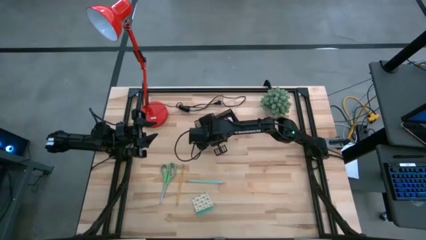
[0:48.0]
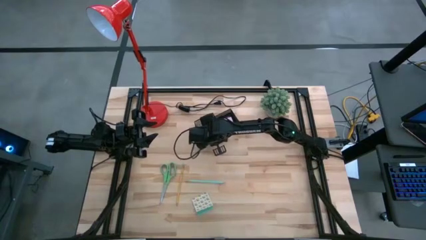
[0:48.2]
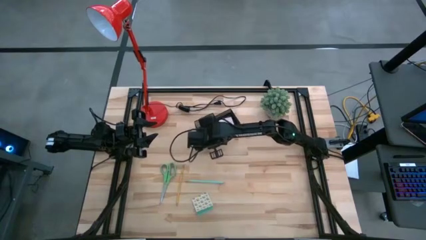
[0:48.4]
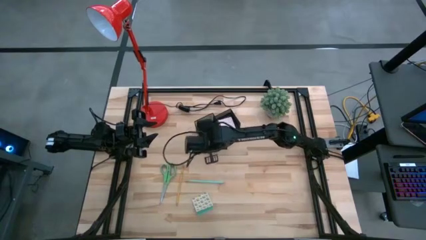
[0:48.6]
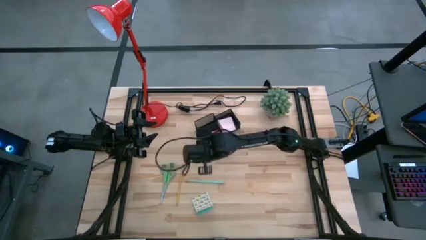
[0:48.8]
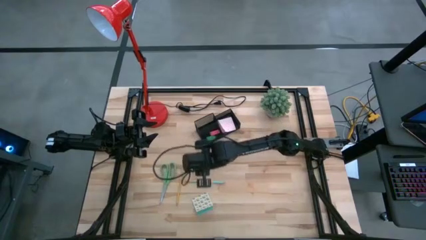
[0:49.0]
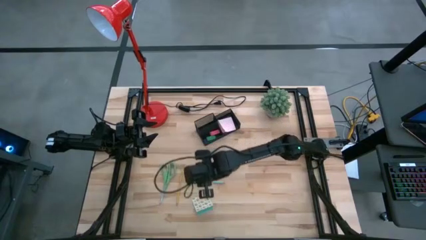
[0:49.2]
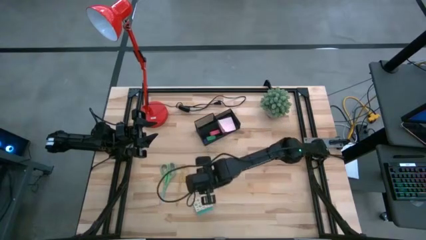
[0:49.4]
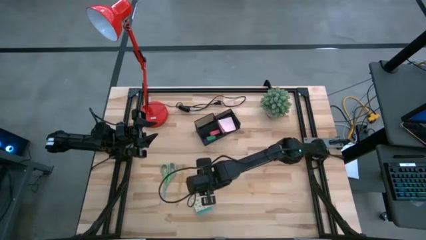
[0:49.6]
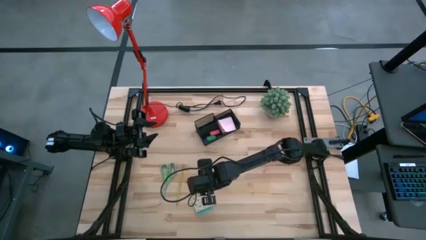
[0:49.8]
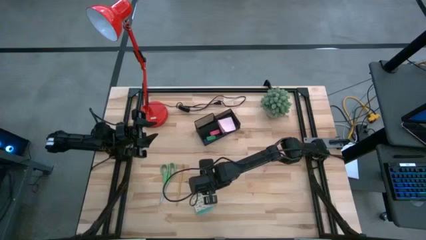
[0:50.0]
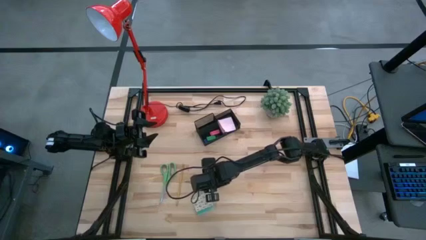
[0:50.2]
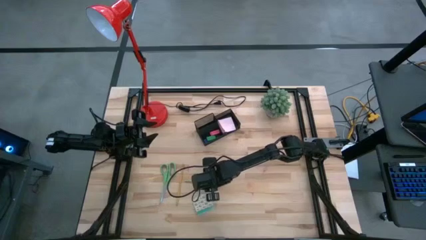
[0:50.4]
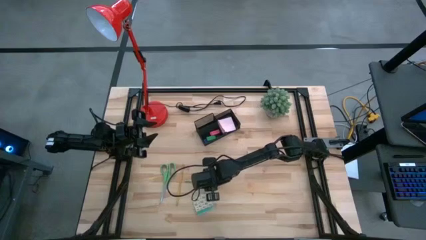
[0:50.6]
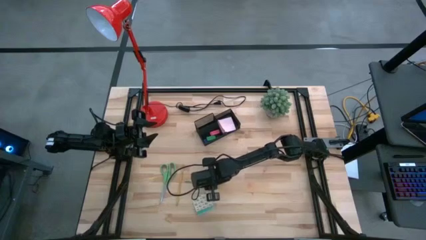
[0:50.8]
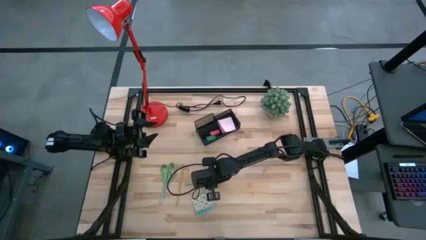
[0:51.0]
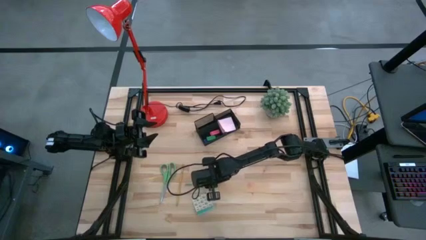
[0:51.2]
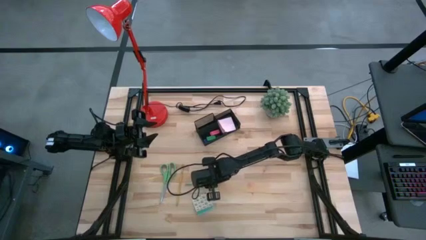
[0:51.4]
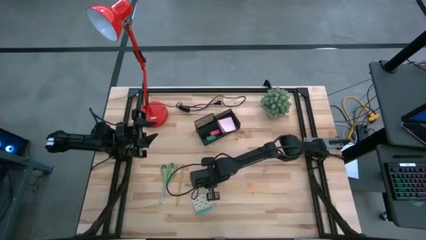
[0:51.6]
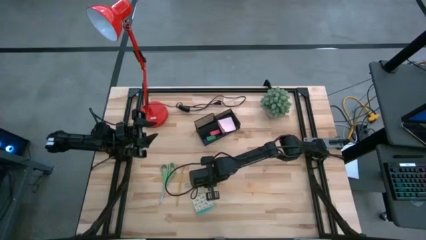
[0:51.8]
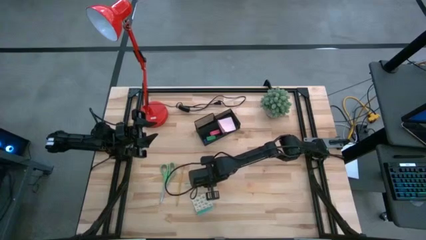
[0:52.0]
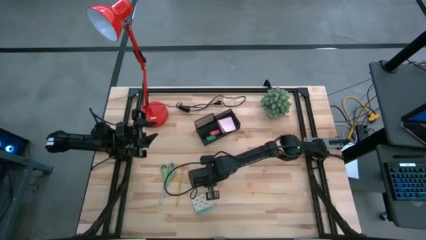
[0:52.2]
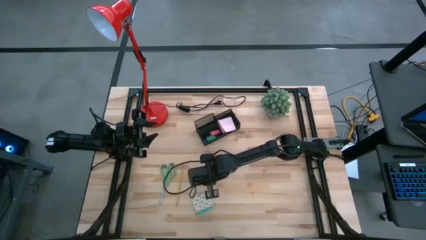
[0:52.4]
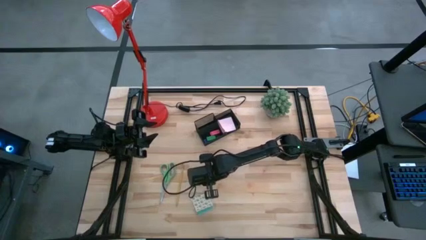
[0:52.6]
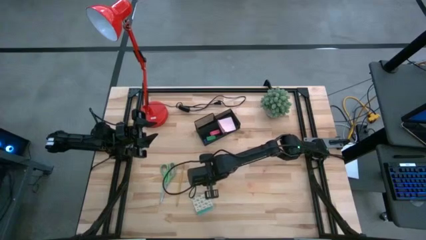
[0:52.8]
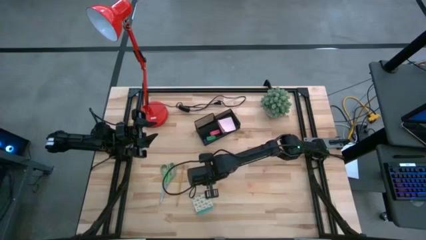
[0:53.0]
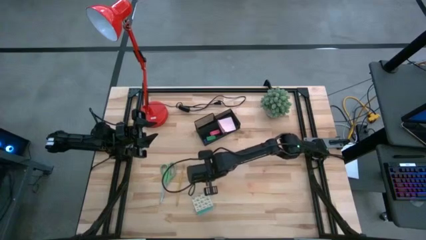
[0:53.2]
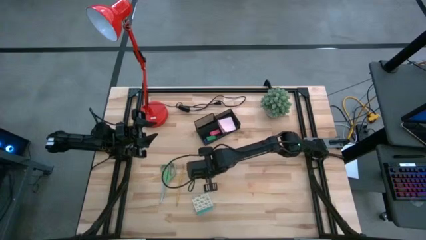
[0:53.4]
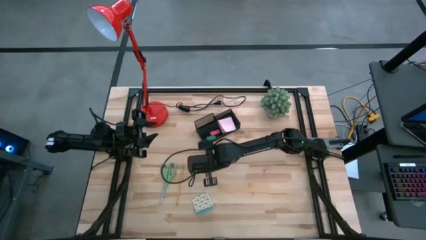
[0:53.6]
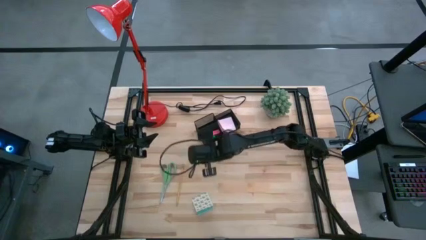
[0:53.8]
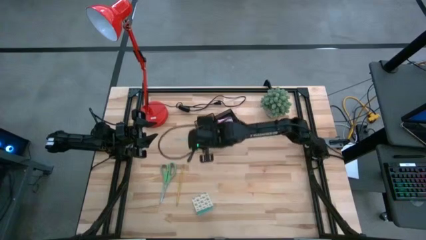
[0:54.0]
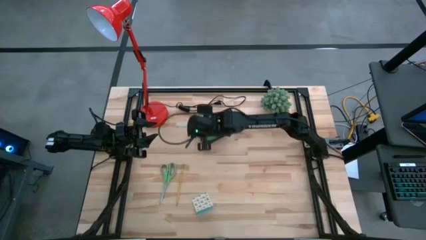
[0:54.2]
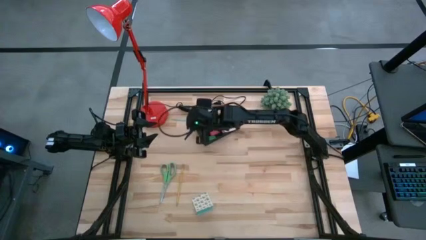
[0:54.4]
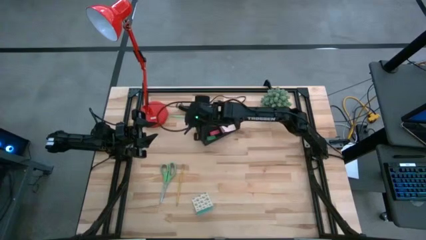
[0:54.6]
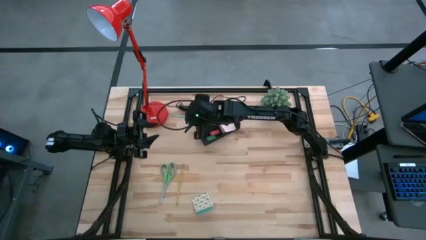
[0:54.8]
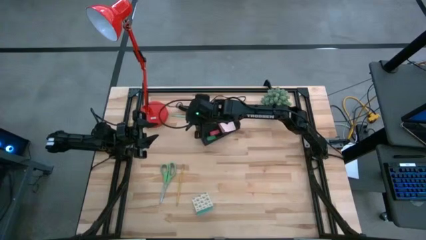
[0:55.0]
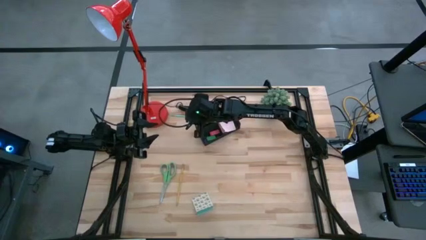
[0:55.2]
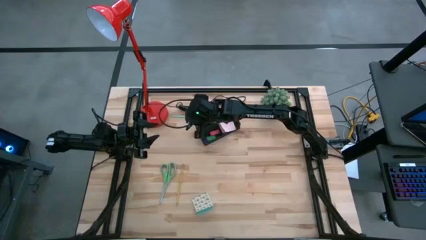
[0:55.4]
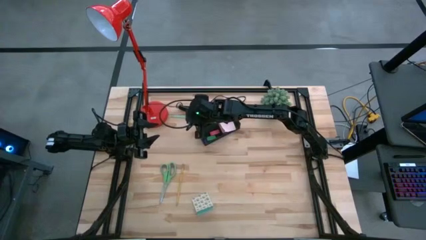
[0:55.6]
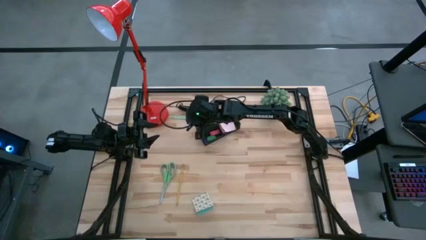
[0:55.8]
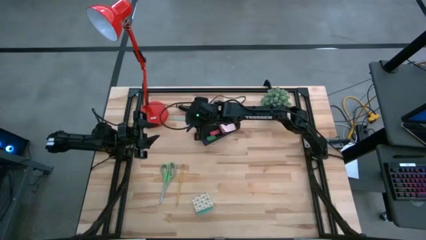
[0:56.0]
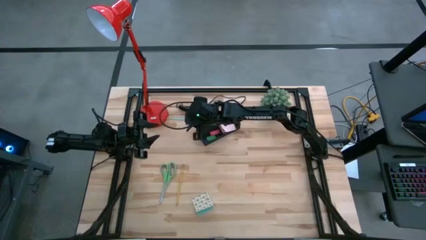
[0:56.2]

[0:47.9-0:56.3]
Task: Pick and place office supplies into organizer
Put the blue pencil into the desk organizer

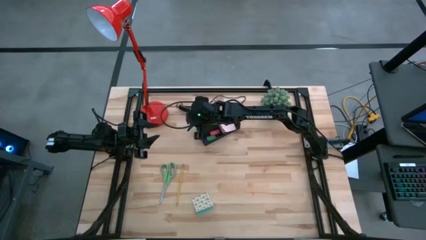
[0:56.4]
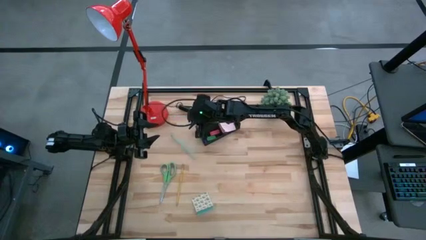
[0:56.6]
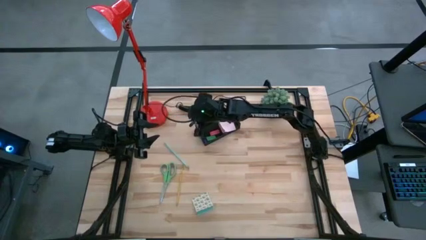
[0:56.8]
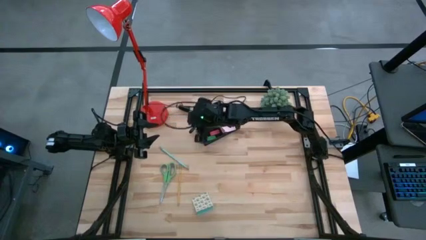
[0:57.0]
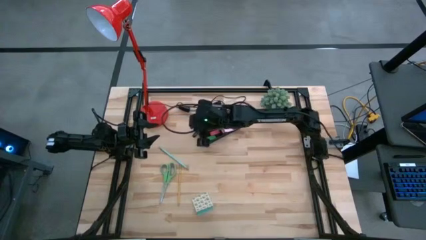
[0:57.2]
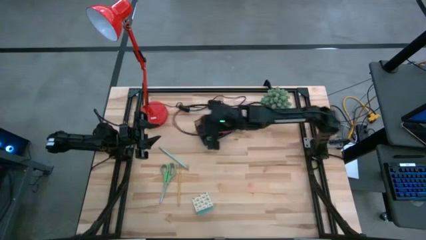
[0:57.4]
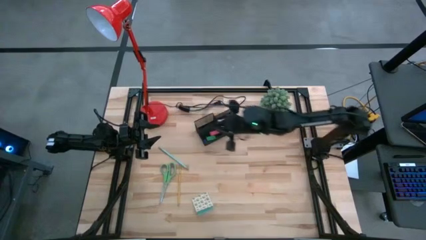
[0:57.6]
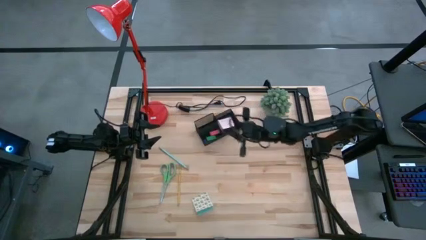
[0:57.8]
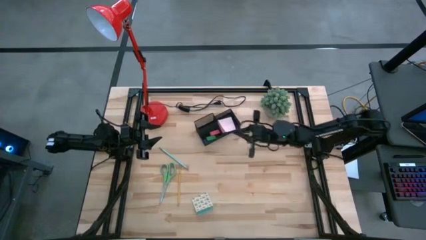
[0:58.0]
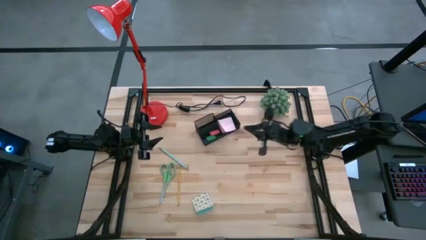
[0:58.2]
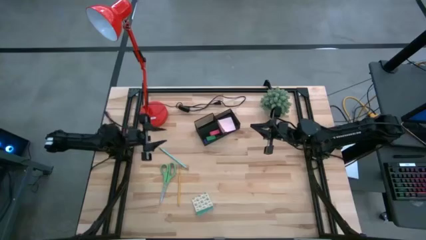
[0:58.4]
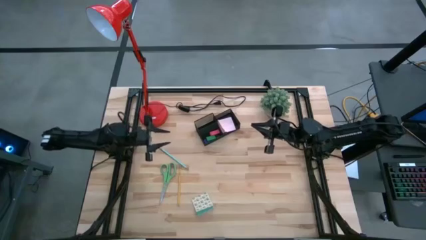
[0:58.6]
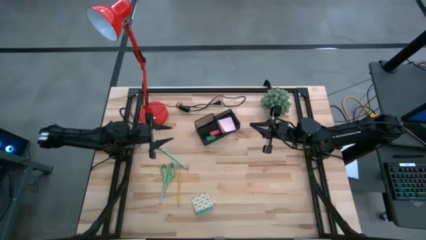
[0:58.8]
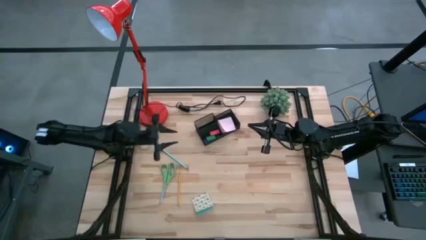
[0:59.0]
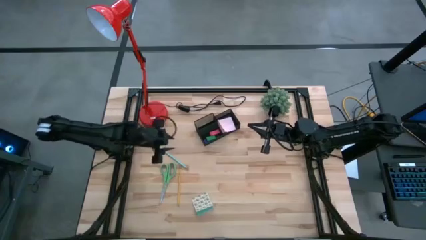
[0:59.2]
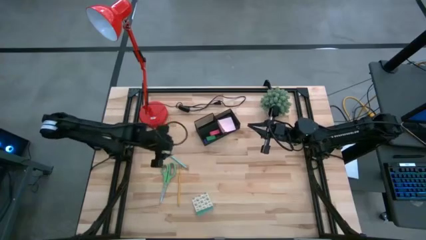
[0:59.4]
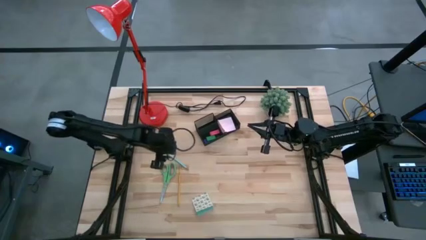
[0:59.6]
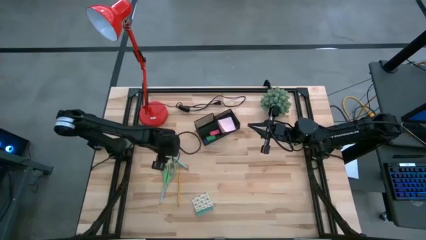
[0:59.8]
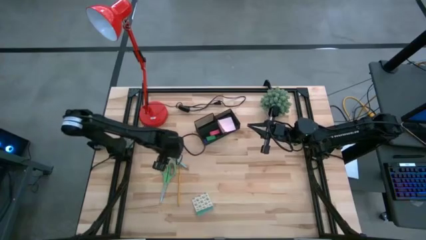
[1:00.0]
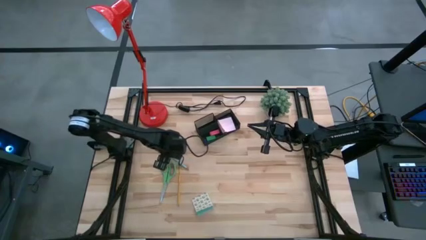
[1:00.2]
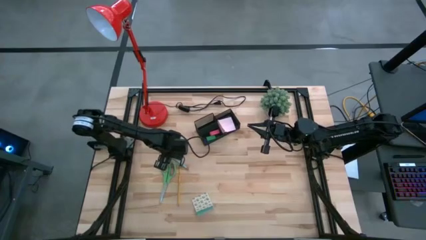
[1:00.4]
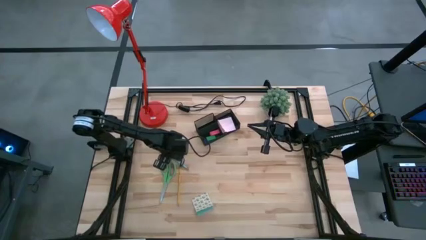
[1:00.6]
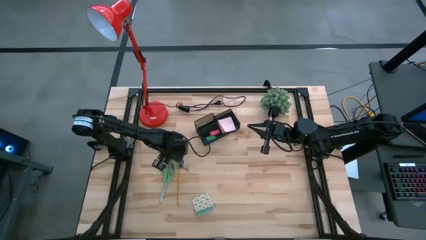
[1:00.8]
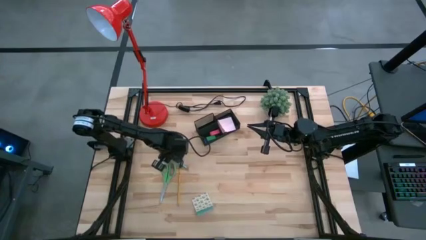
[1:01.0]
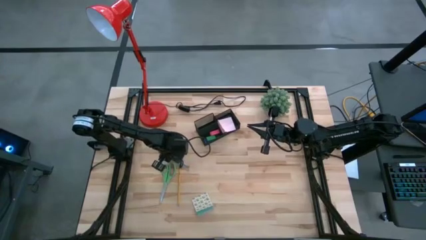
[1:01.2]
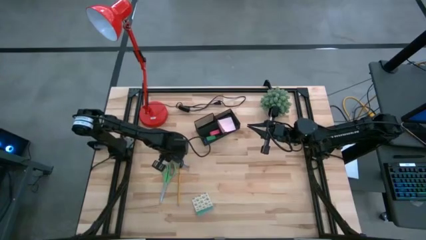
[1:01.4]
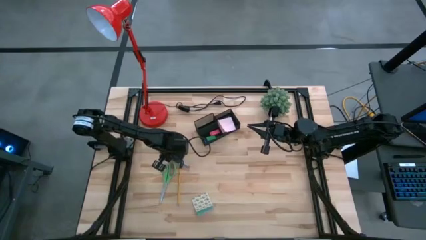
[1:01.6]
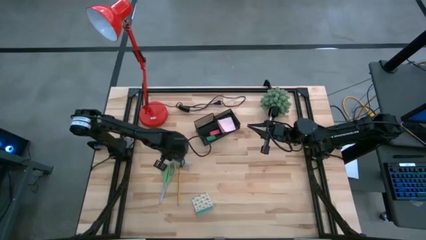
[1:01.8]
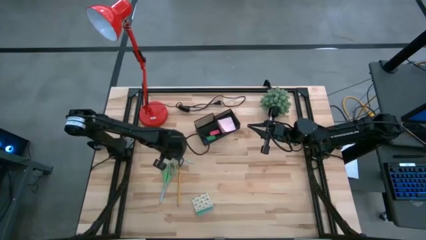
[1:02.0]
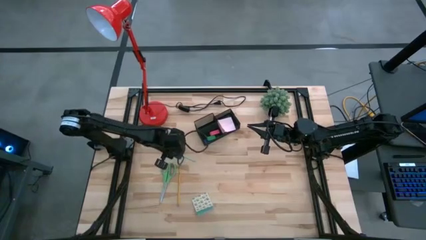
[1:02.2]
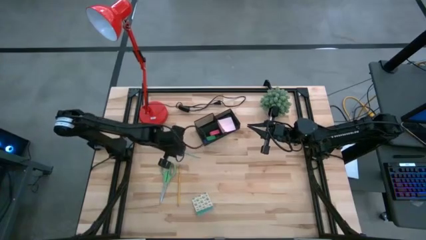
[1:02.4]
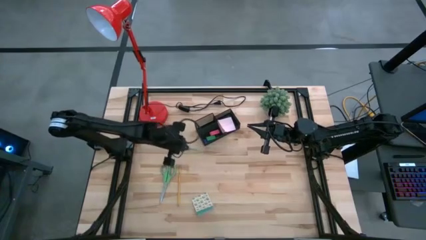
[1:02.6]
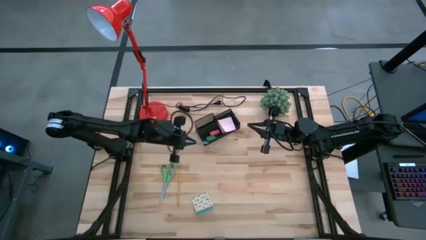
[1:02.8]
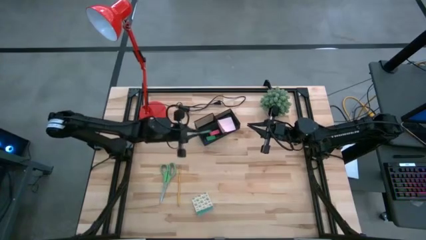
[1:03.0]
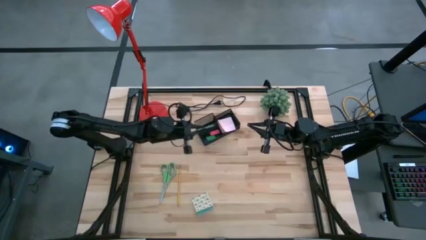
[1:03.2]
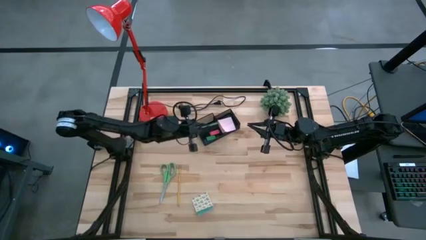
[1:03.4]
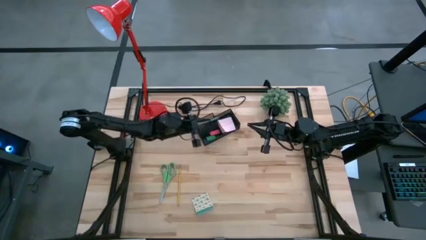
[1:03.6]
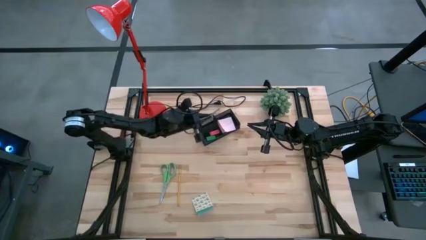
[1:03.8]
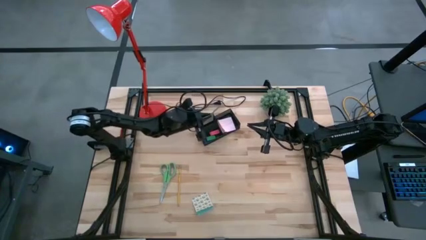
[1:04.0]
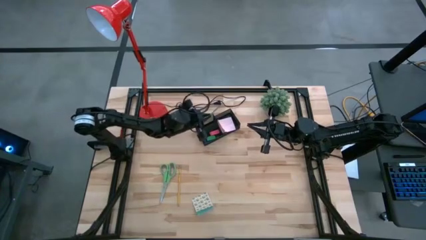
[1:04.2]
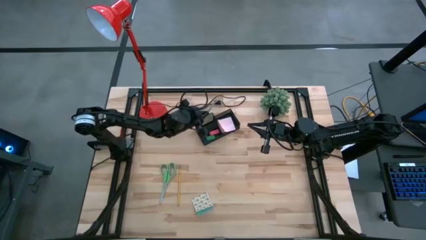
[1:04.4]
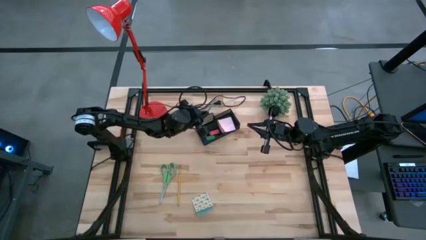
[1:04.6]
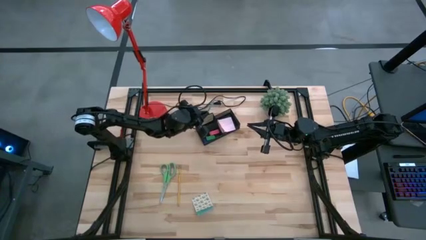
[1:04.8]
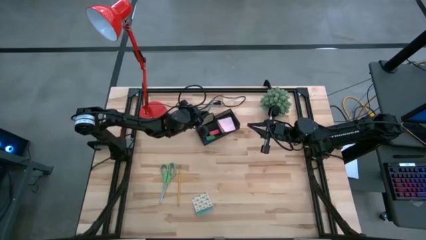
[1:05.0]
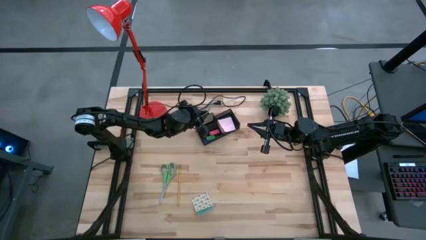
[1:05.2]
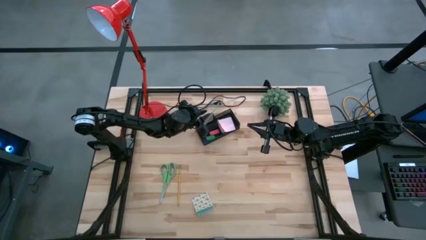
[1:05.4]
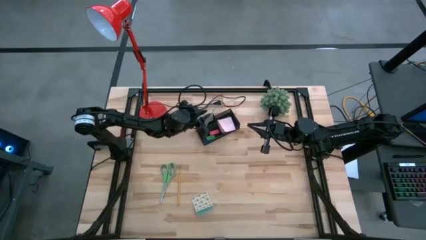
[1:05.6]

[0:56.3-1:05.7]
Put the blue pencil into the desk organizer
